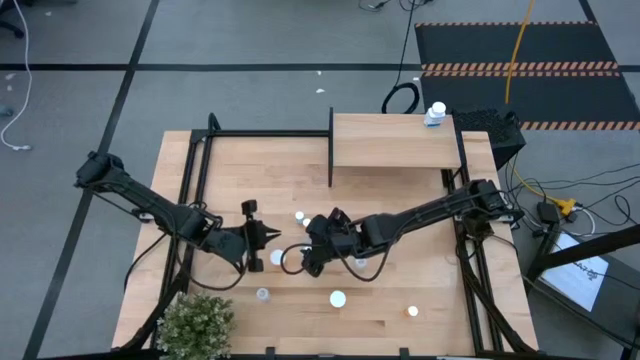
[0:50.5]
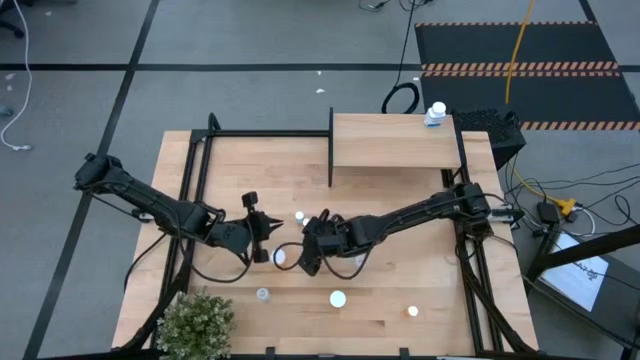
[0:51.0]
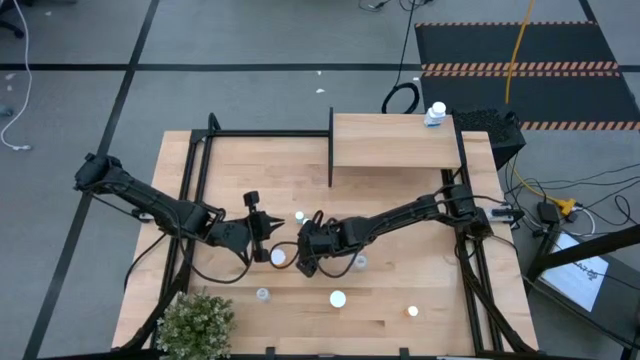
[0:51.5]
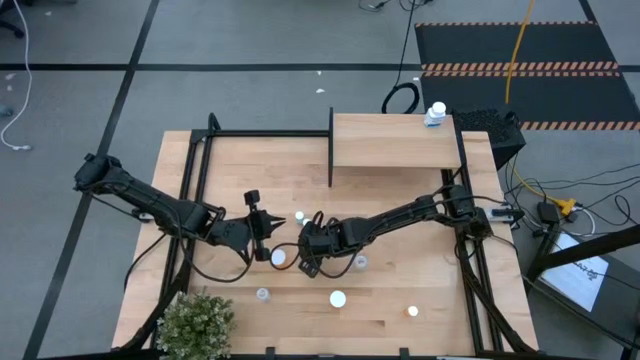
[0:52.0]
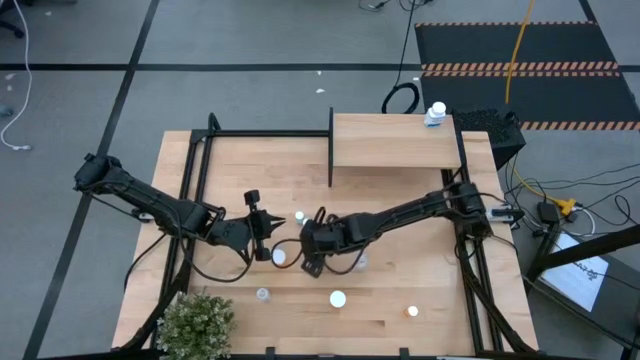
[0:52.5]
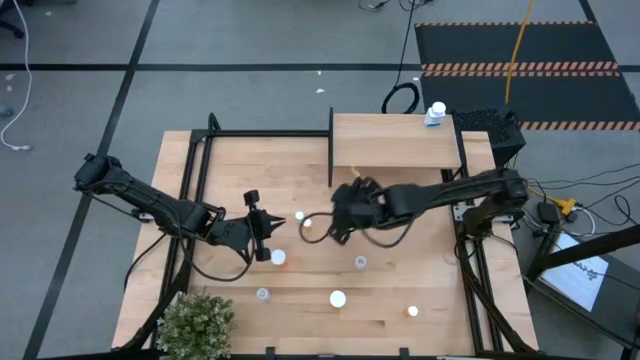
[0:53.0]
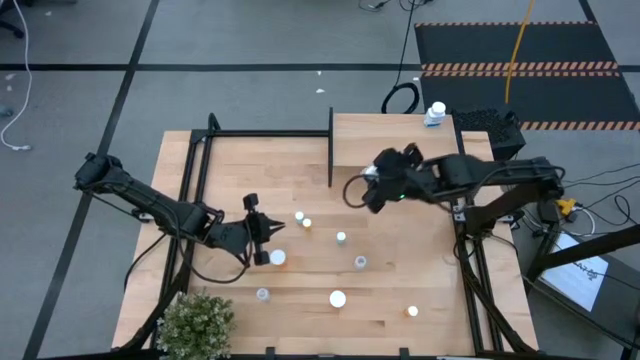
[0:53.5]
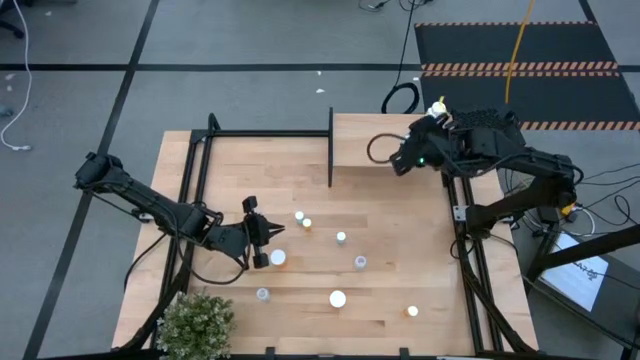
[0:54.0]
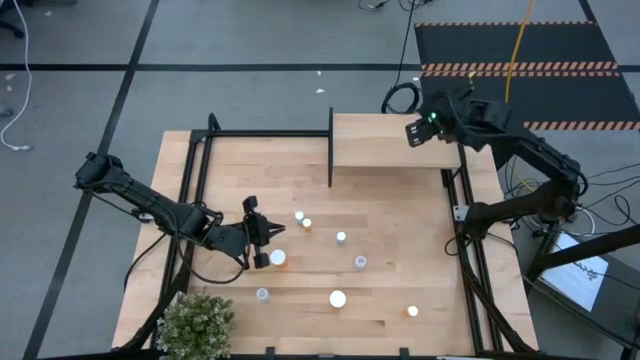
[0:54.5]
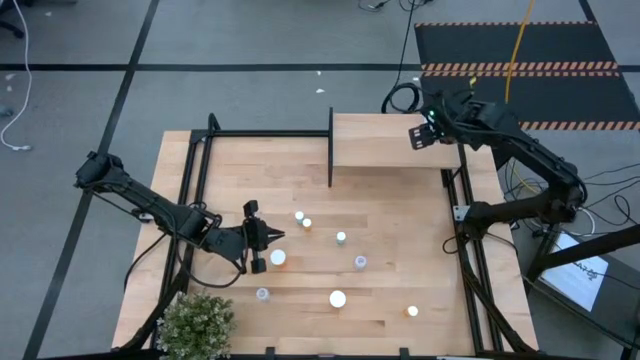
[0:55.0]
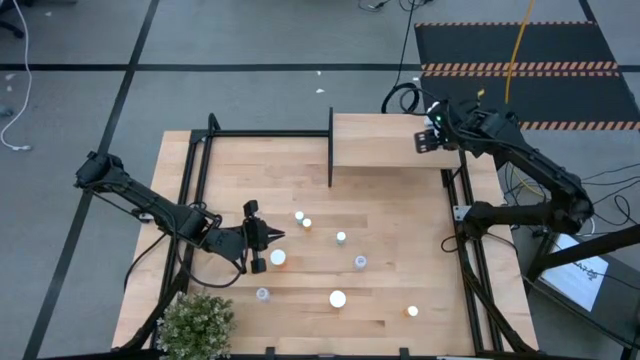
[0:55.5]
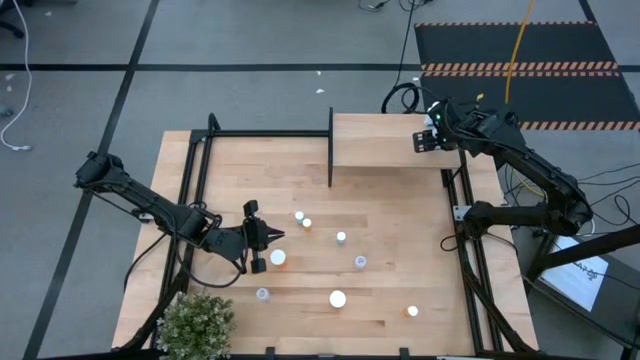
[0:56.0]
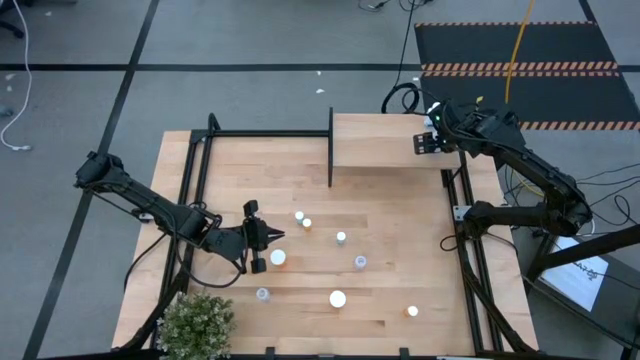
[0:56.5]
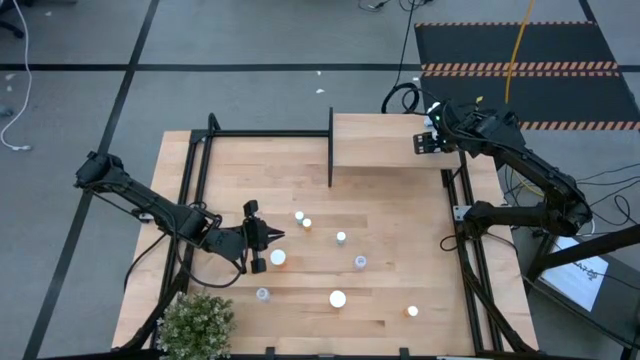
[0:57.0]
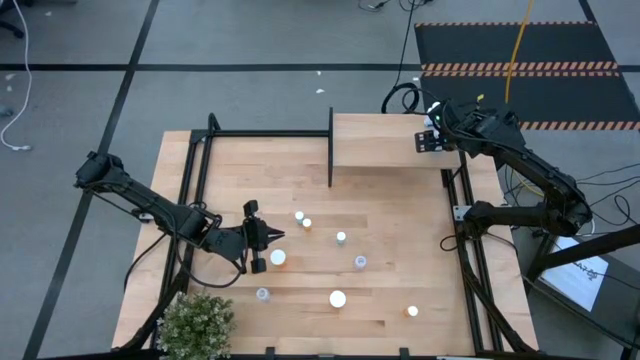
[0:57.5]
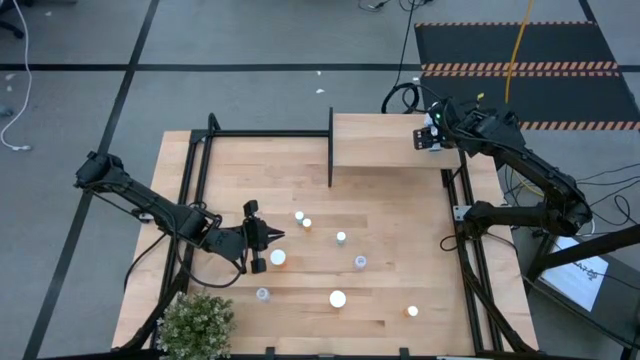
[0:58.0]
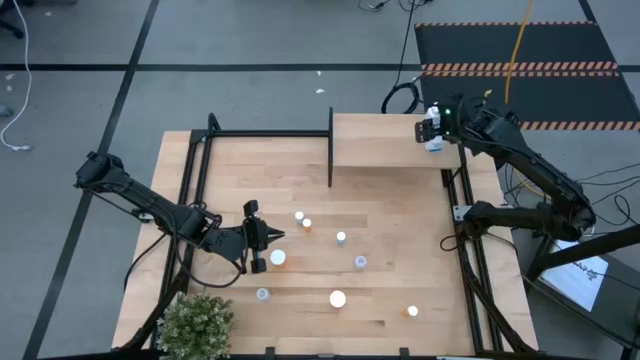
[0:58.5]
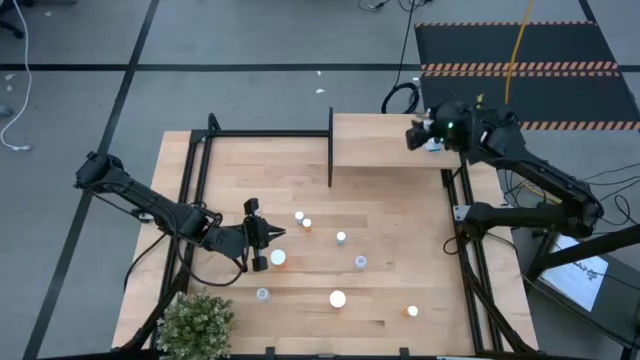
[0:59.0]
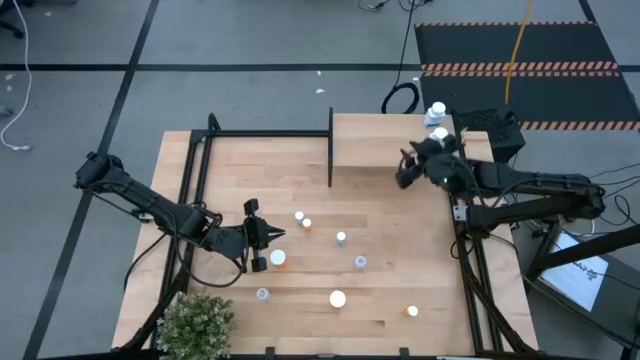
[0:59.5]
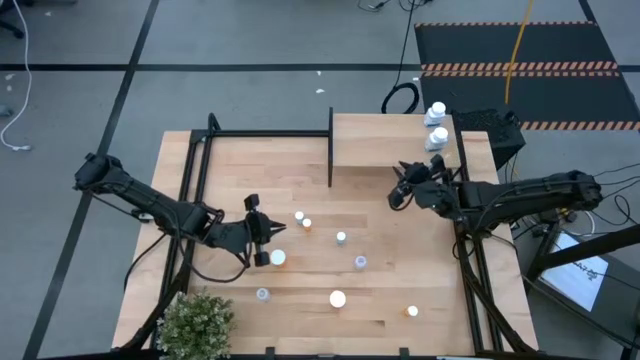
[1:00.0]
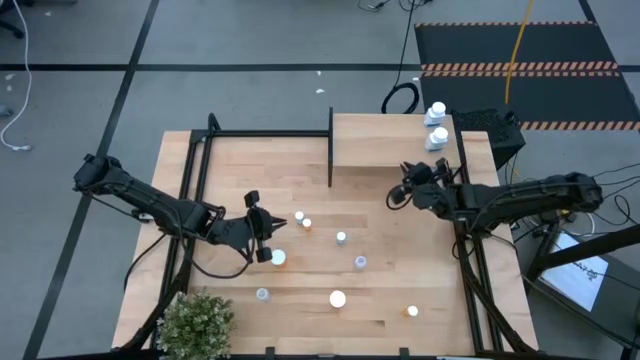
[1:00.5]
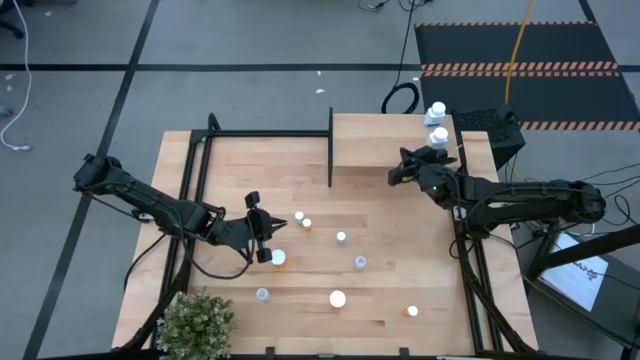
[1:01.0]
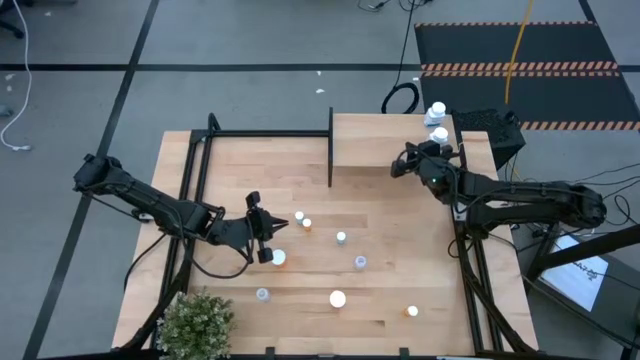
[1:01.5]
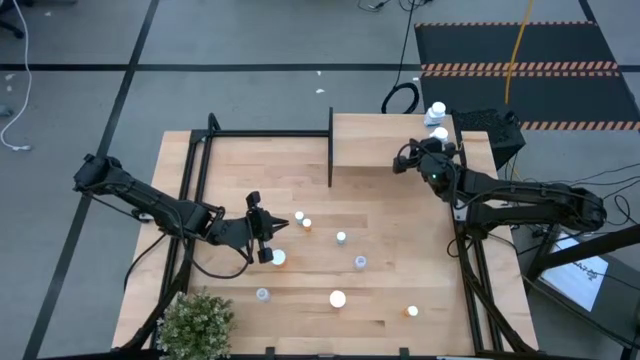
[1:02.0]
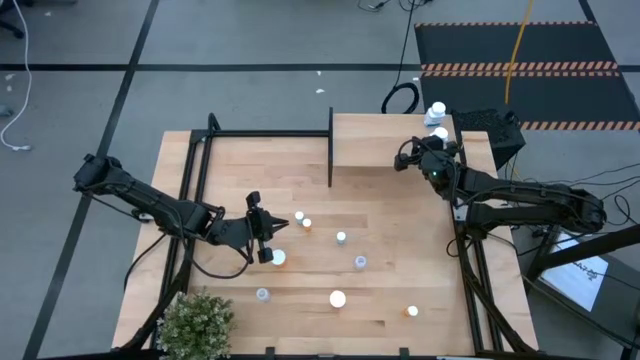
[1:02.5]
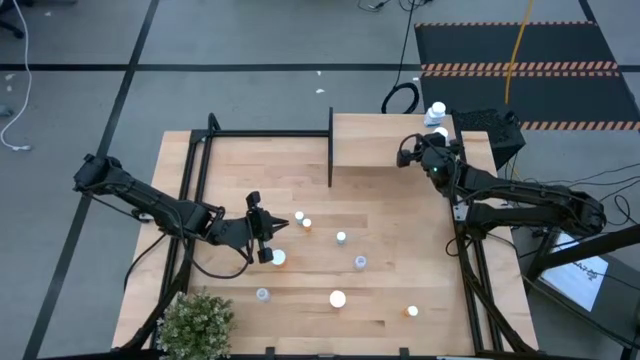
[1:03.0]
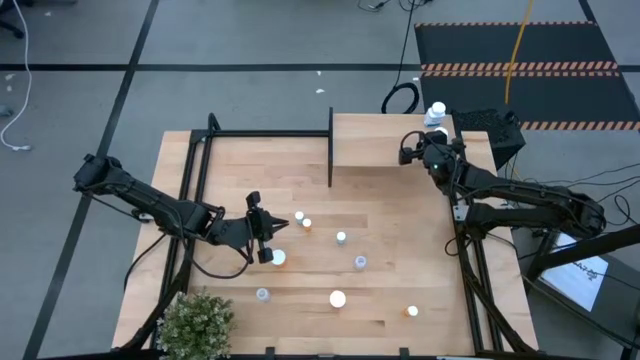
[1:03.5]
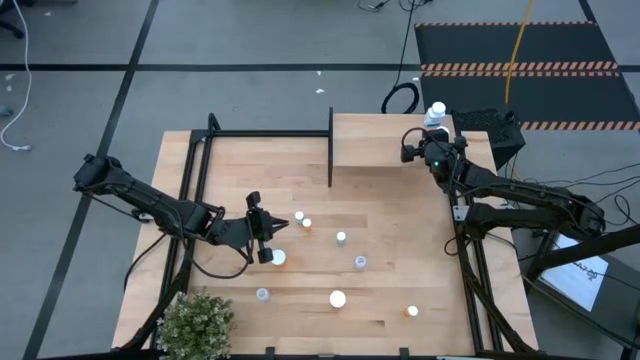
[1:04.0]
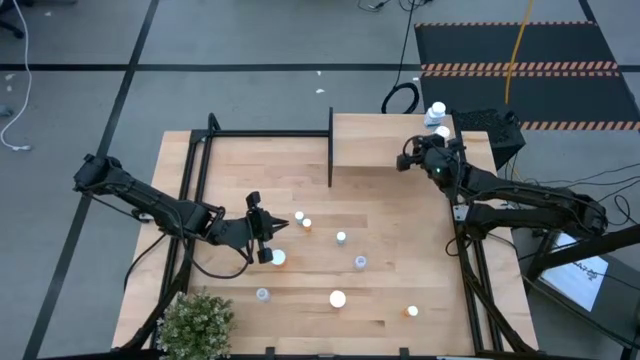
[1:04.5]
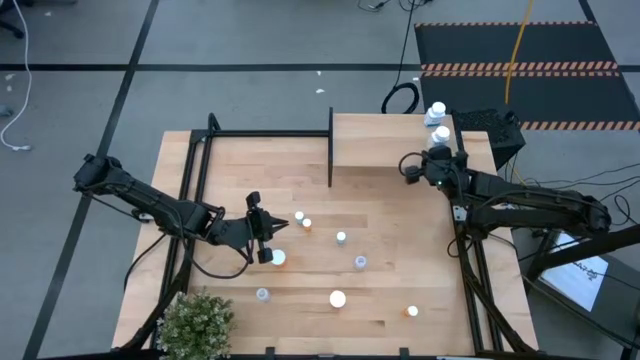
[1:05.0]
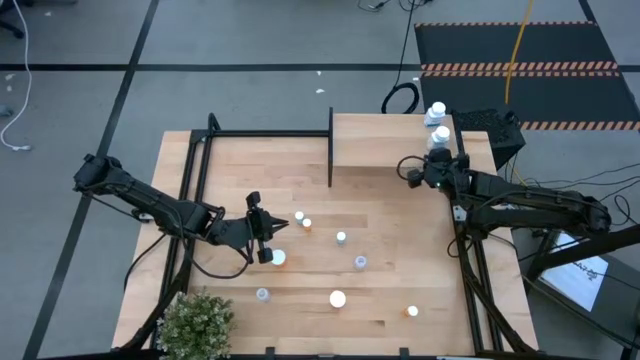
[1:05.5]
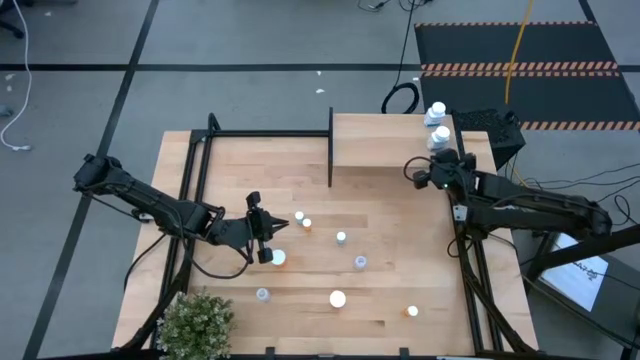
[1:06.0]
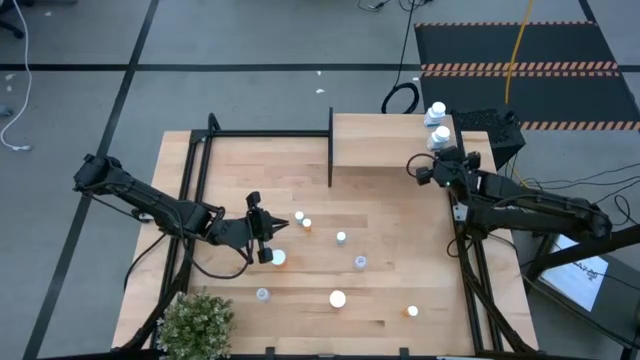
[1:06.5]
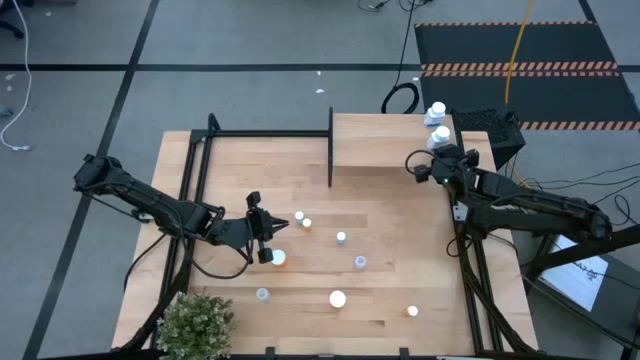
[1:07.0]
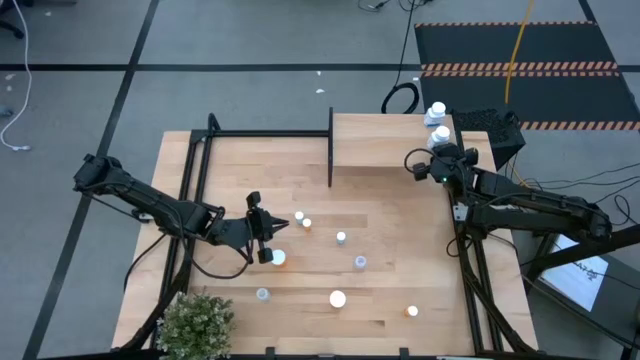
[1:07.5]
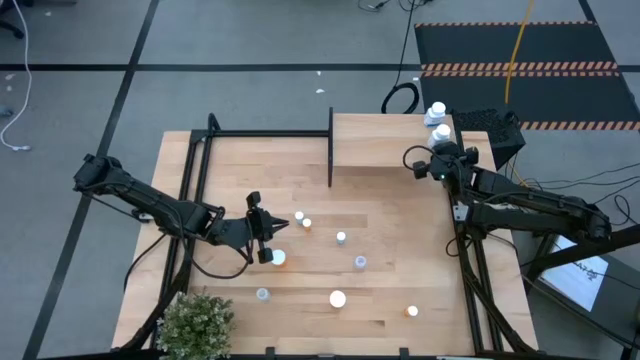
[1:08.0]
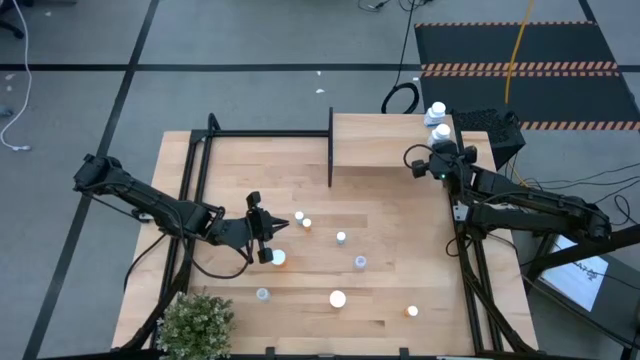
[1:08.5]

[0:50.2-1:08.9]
Task: Pick and place medicine bottles onto shelf by color
Put the white pill bottle on the shelf aligned with the other white pill bottle
